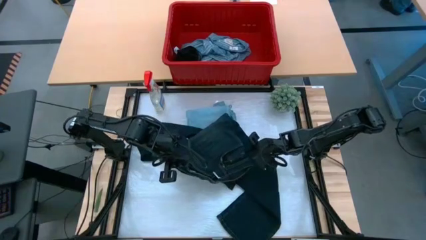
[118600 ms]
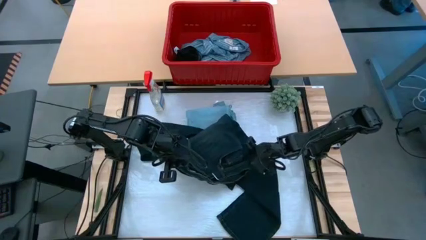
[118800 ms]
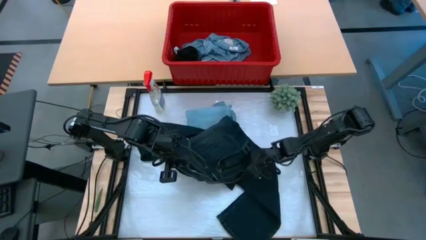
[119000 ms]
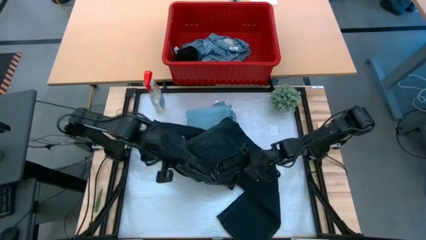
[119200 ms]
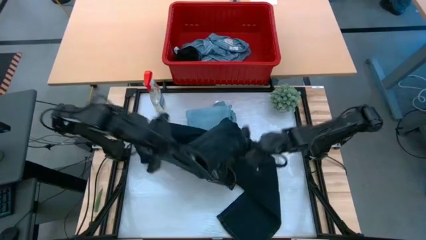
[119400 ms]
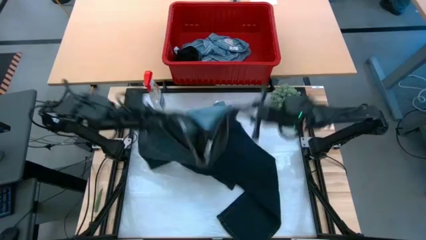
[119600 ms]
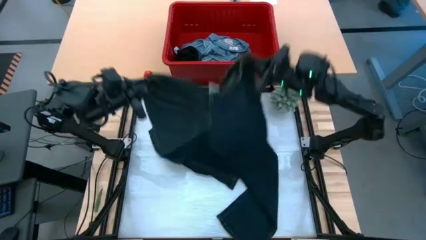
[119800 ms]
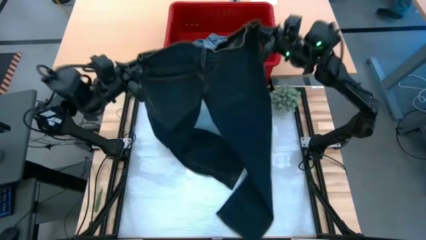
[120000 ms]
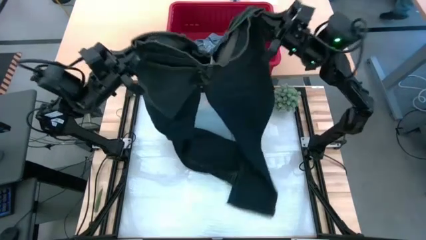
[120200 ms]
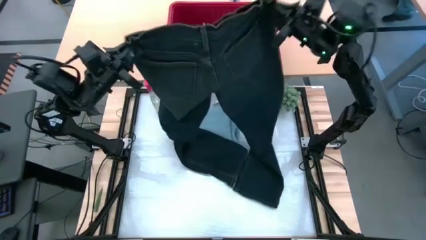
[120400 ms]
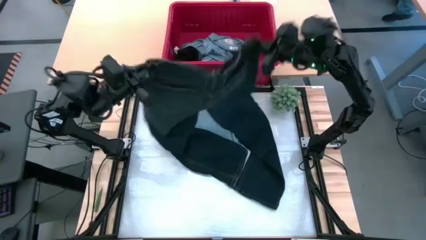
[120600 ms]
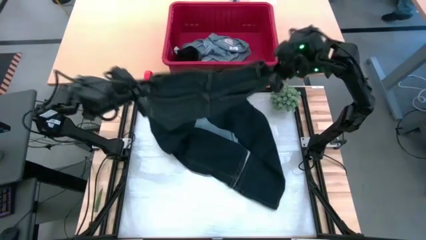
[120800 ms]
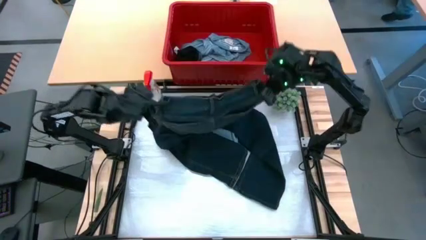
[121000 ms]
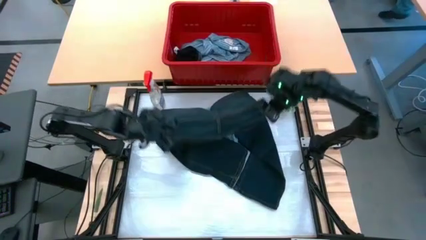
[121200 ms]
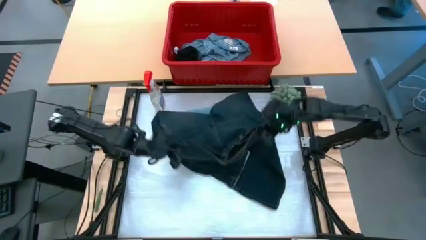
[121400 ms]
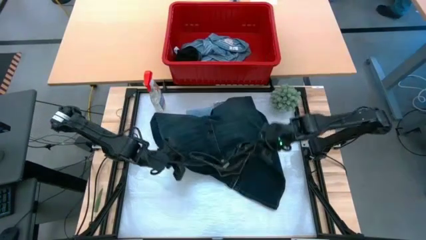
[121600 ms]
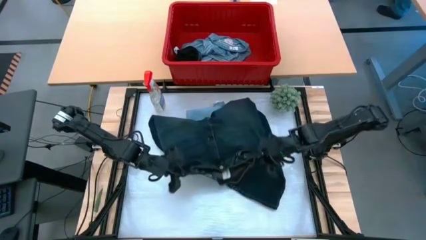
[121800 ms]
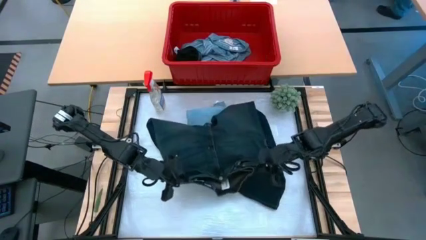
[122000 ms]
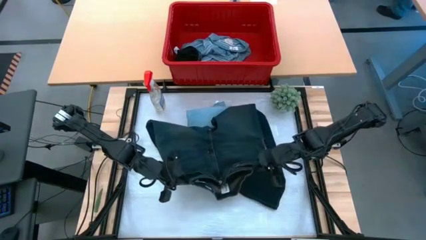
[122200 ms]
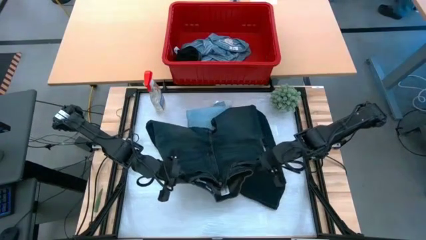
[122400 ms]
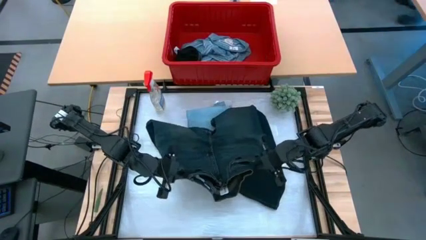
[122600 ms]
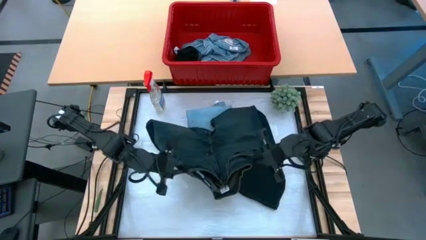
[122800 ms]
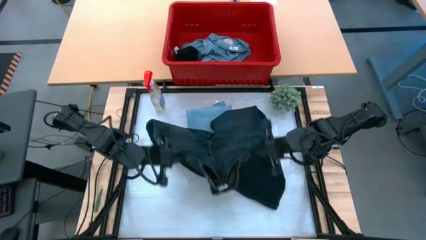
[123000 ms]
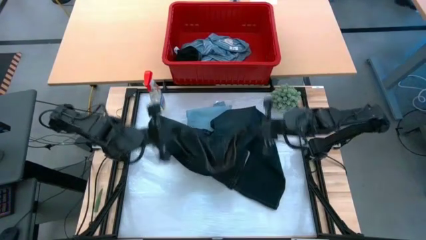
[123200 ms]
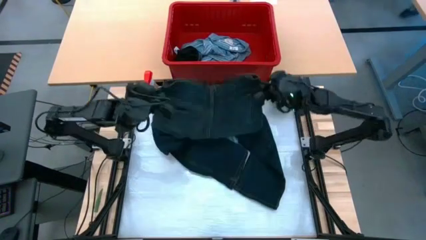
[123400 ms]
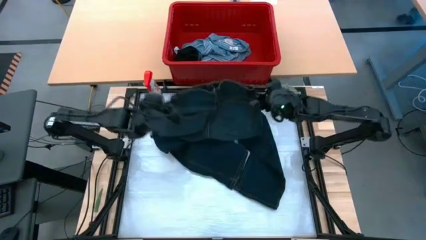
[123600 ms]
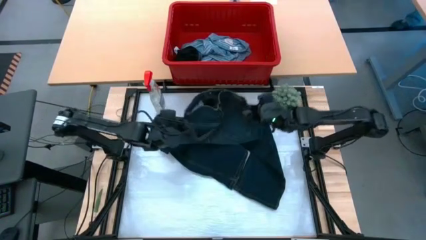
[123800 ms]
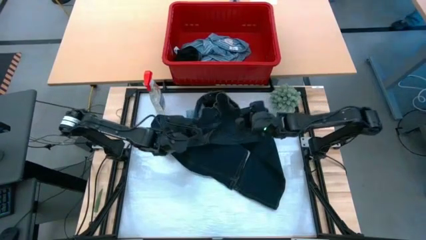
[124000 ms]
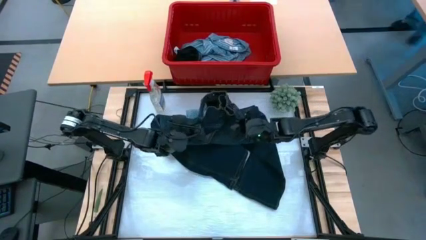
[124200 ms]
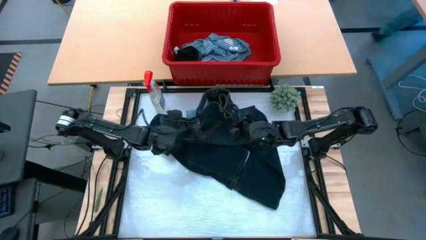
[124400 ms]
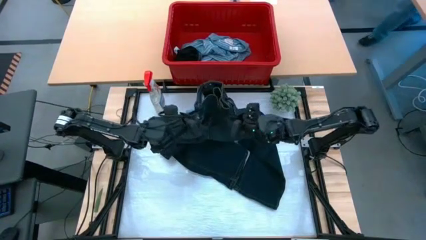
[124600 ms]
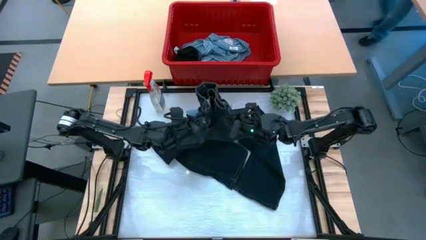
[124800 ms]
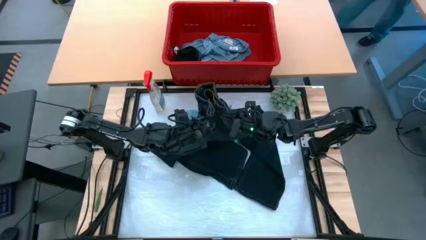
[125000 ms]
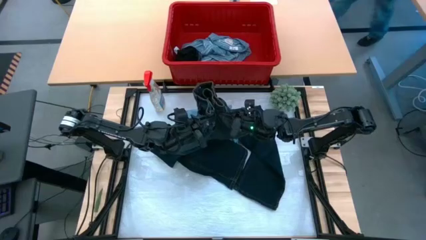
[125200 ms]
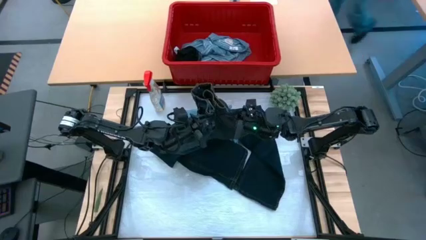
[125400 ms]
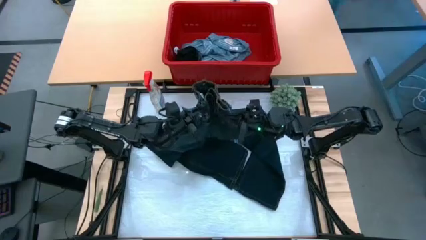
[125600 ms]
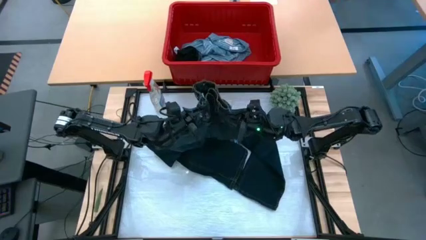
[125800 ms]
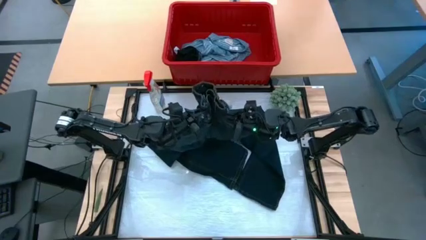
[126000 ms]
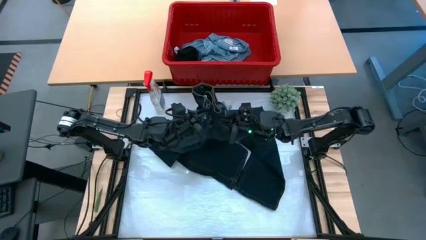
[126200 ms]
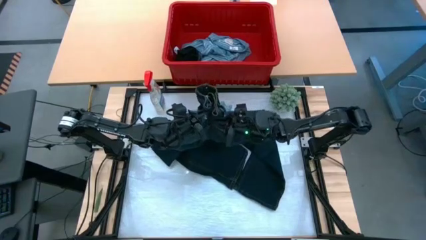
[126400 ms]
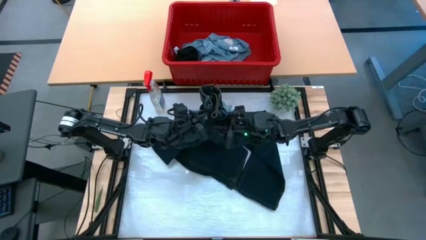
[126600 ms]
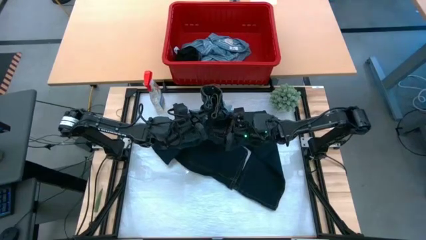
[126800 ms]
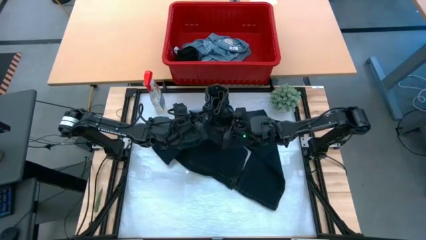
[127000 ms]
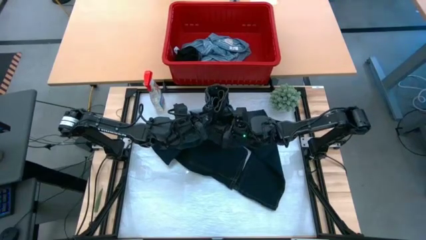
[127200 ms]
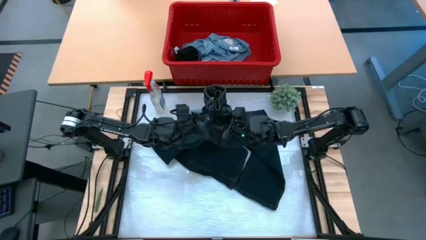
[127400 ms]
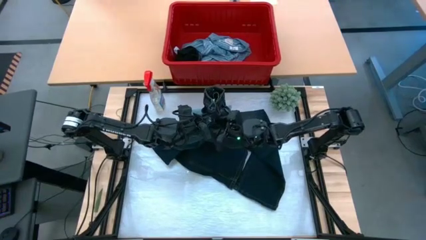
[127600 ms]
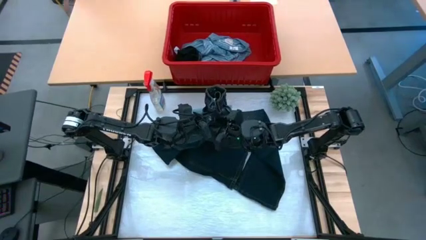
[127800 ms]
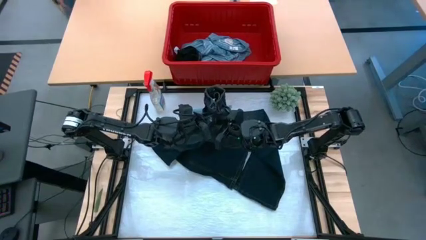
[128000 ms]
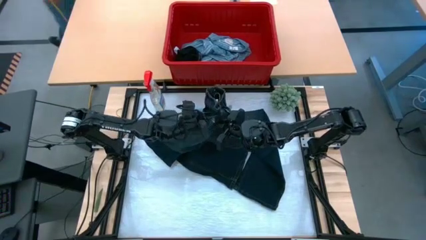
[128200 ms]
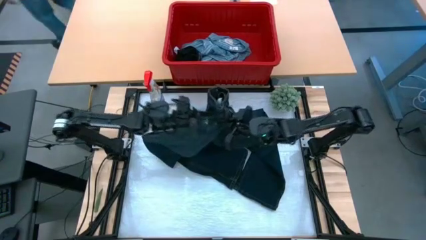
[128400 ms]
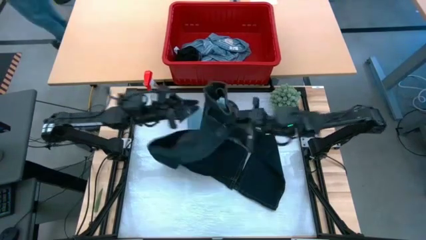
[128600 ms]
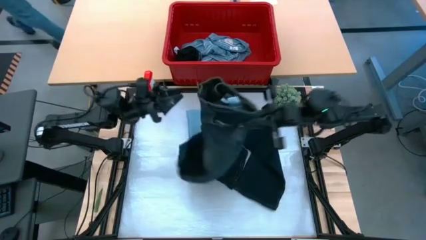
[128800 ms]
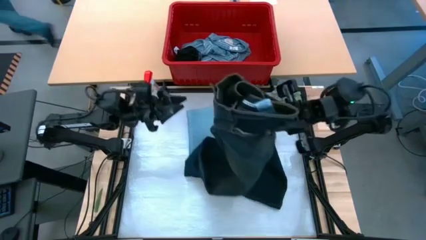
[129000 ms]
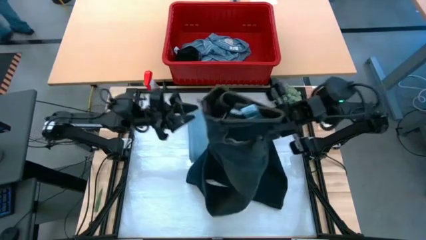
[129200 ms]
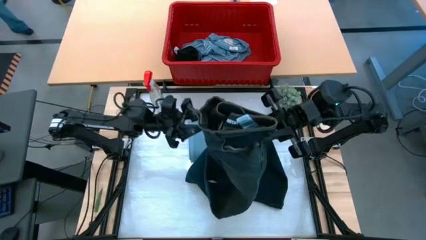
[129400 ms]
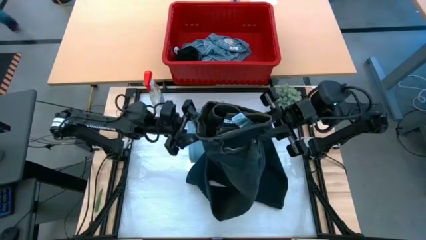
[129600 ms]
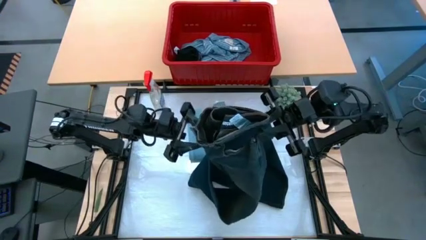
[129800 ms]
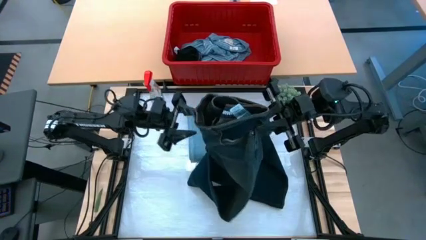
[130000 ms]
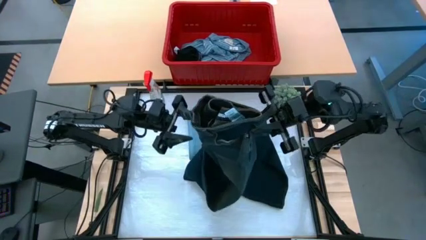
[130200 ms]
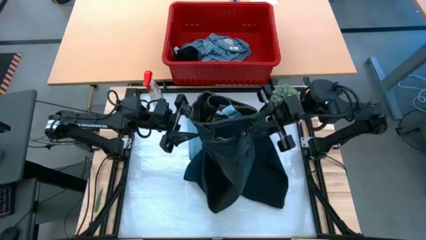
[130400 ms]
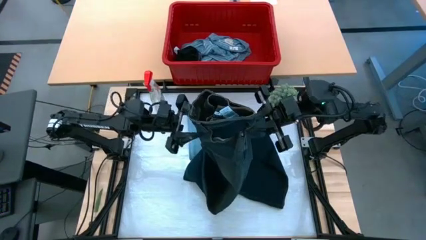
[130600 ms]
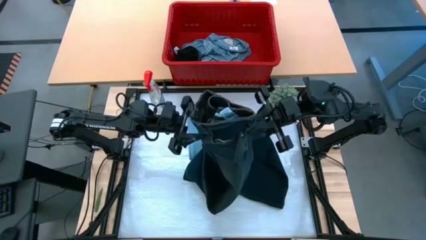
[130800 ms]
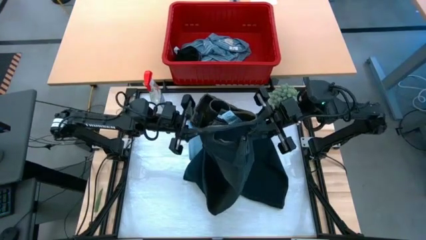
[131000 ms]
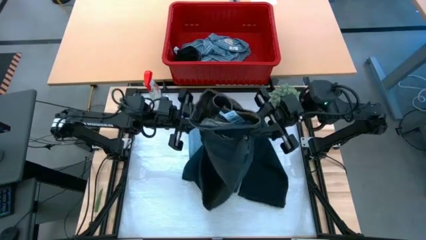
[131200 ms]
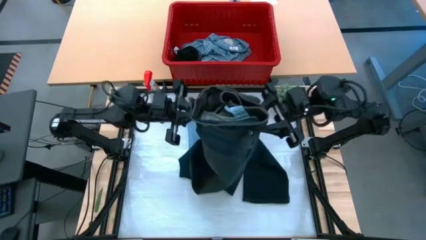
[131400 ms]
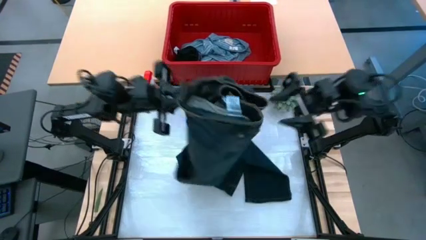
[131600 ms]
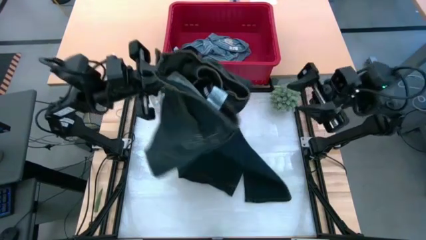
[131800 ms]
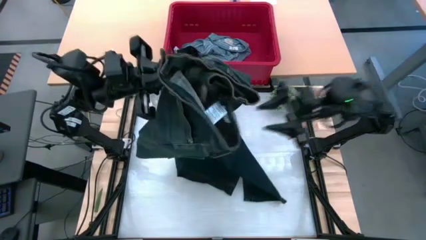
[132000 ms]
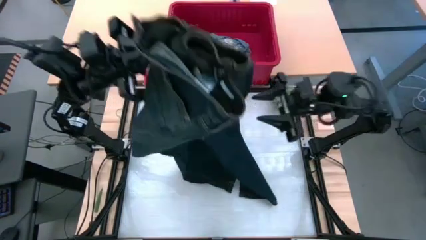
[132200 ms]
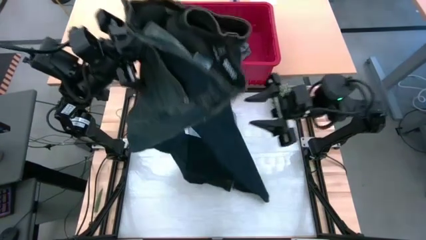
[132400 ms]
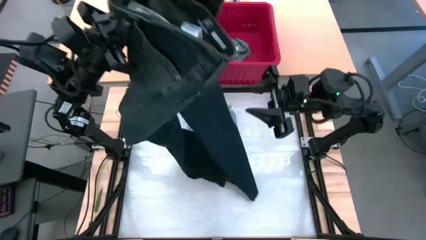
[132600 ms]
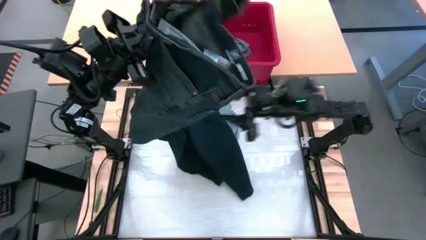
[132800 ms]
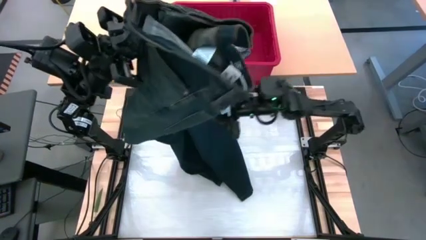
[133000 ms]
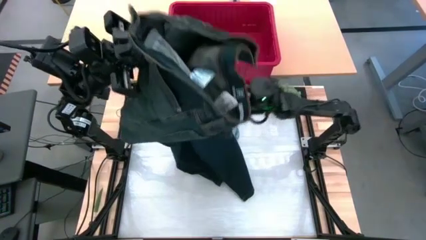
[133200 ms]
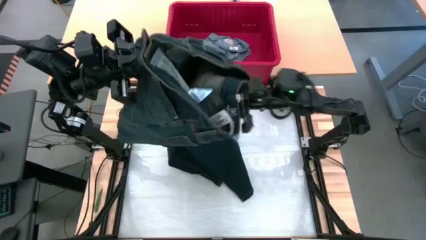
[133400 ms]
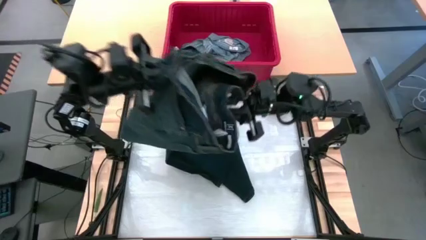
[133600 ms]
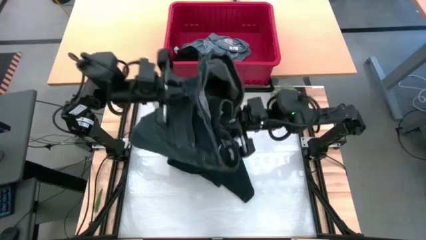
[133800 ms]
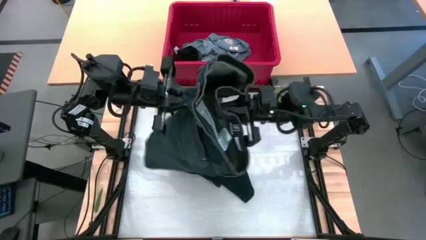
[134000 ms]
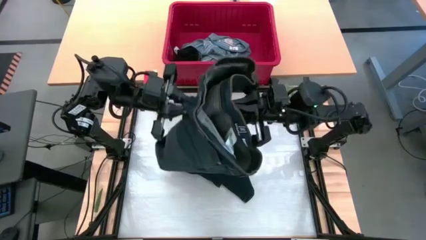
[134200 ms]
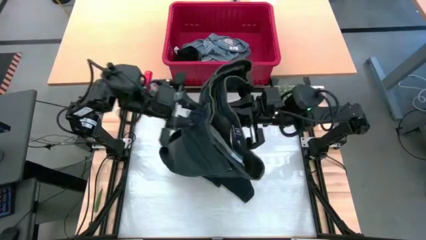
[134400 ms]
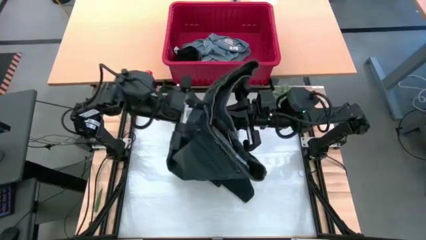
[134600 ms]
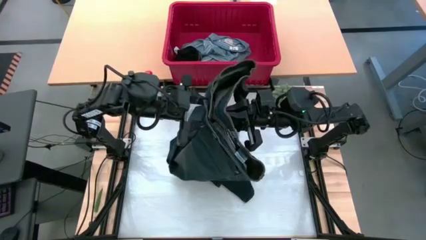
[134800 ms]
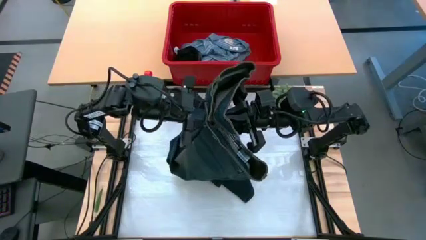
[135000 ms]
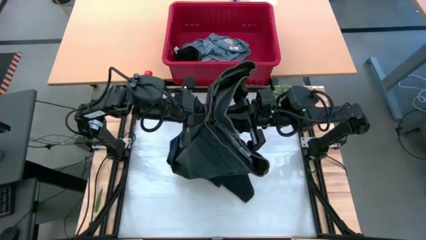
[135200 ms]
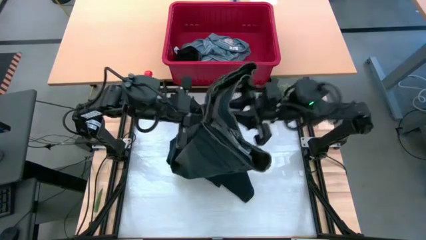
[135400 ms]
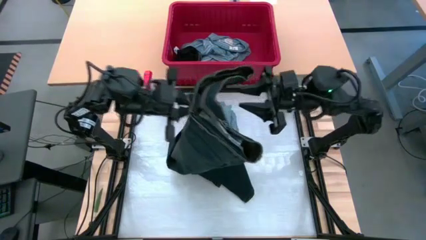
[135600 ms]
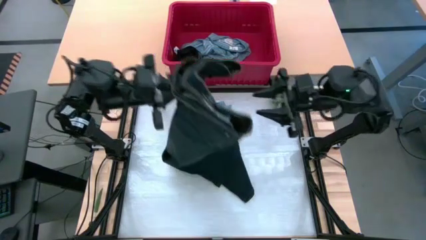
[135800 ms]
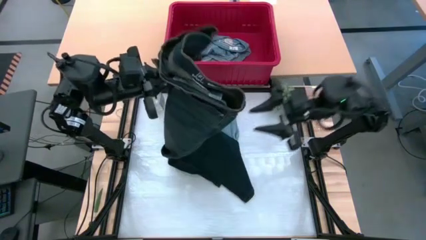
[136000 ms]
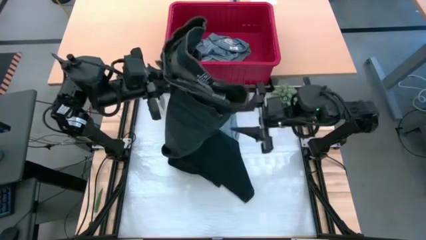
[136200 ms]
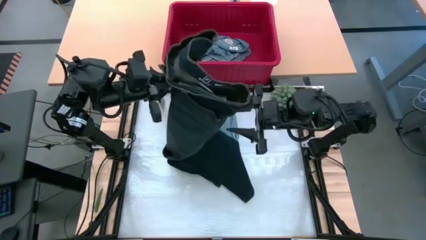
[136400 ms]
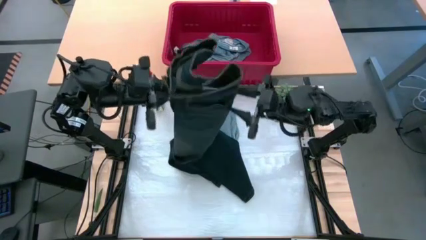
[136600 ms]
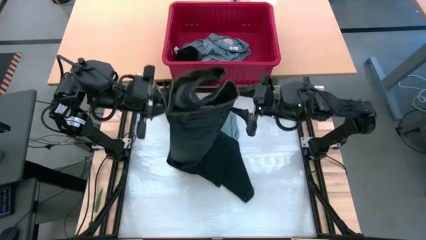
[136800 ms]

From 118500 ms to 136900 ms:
Task: Fold Laundry from Bin
Fold the black pants from the red laundry bin
